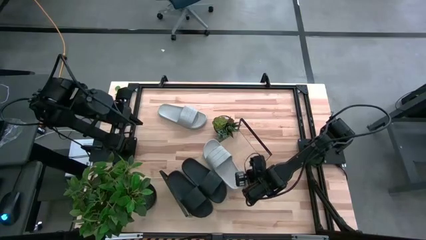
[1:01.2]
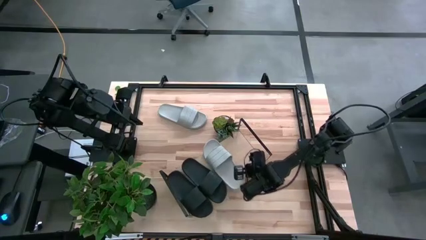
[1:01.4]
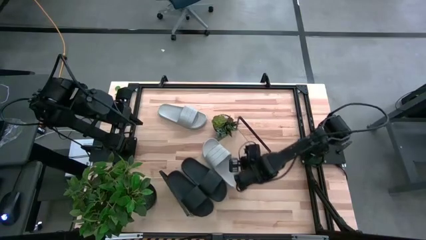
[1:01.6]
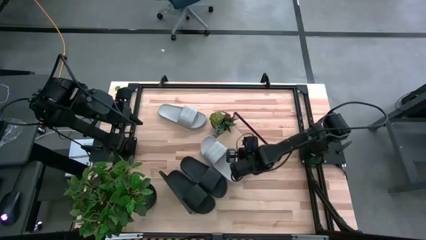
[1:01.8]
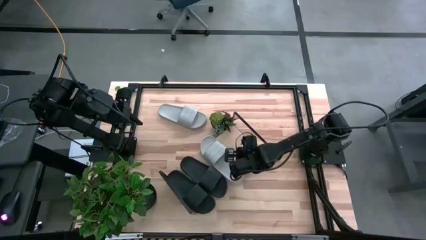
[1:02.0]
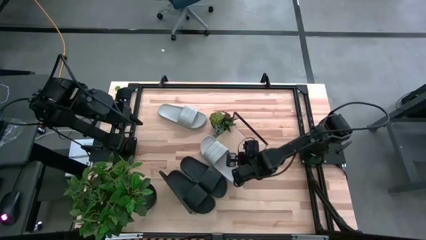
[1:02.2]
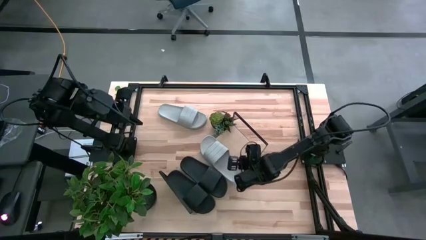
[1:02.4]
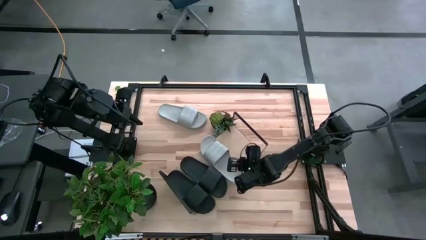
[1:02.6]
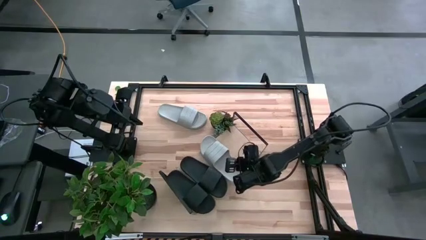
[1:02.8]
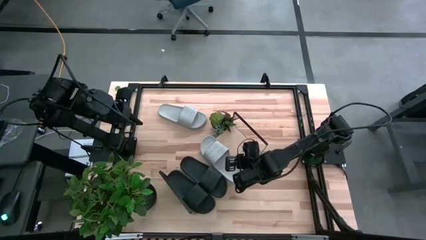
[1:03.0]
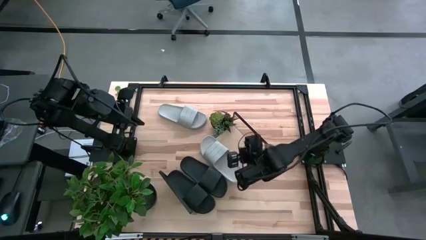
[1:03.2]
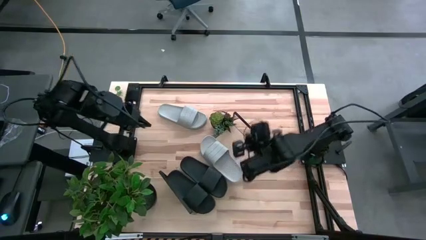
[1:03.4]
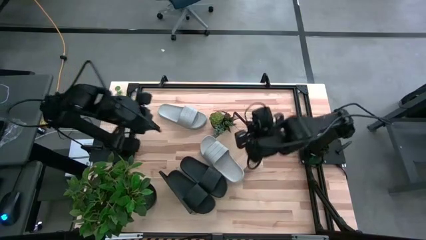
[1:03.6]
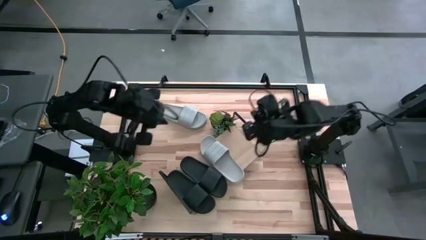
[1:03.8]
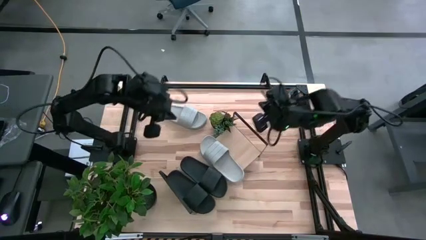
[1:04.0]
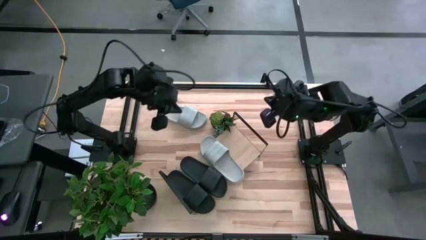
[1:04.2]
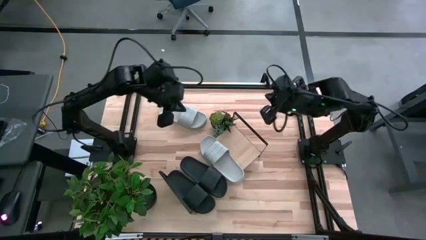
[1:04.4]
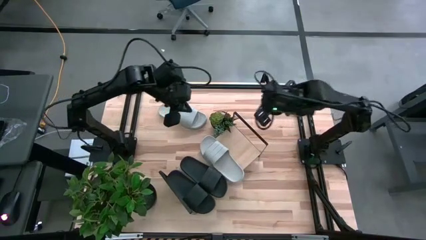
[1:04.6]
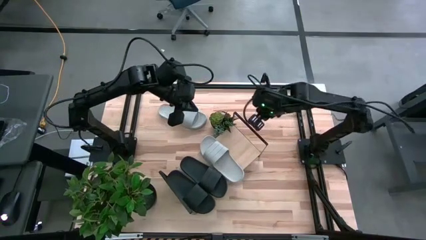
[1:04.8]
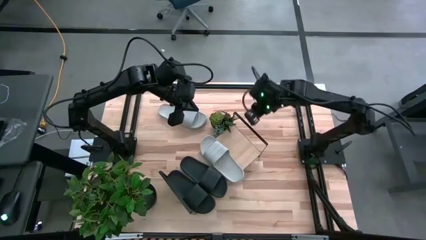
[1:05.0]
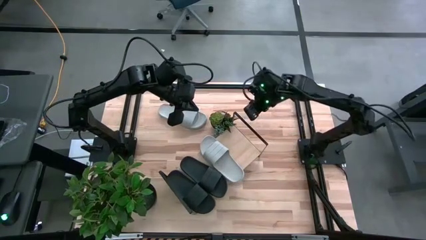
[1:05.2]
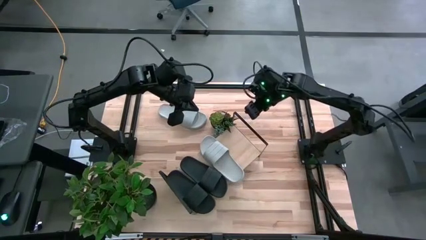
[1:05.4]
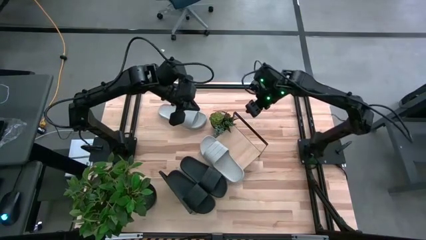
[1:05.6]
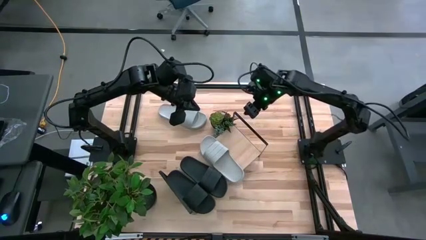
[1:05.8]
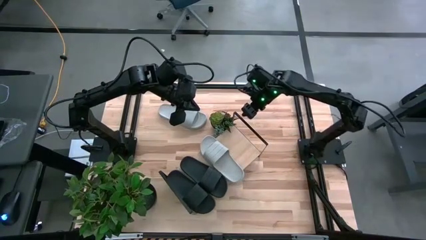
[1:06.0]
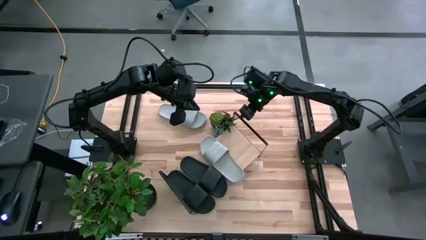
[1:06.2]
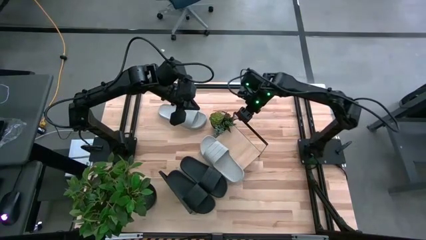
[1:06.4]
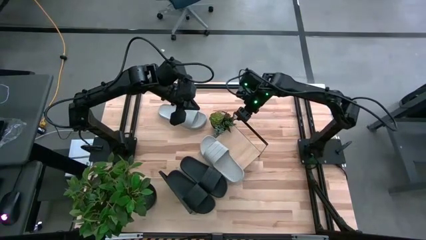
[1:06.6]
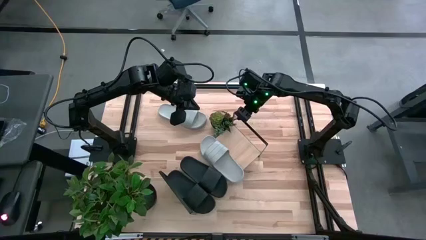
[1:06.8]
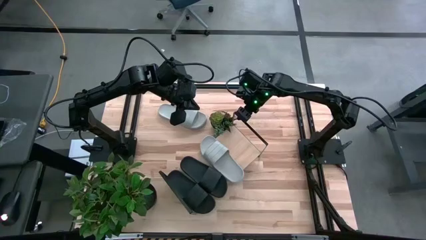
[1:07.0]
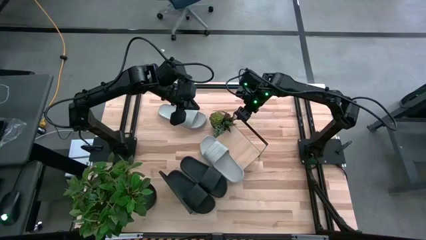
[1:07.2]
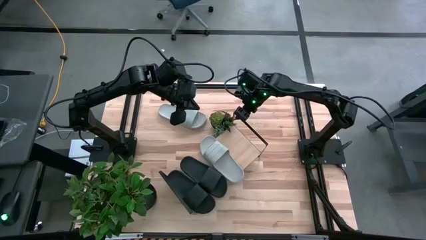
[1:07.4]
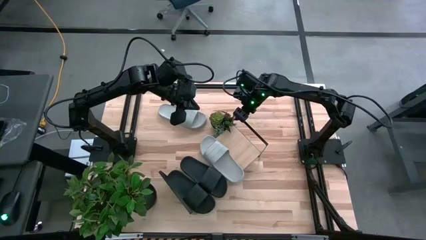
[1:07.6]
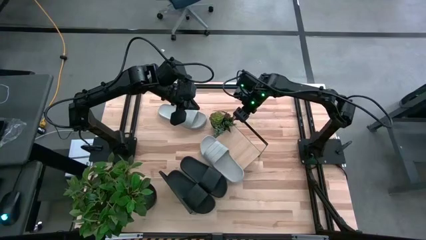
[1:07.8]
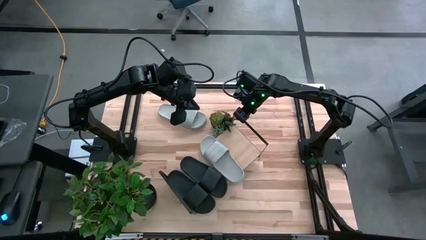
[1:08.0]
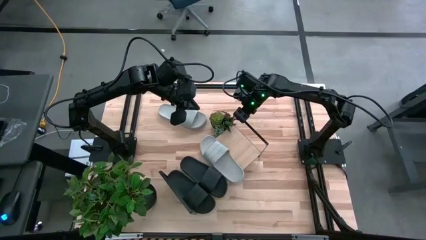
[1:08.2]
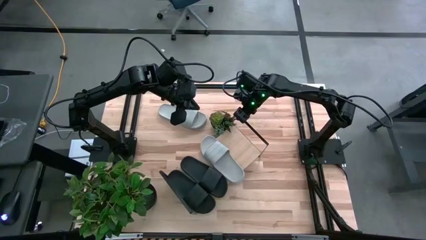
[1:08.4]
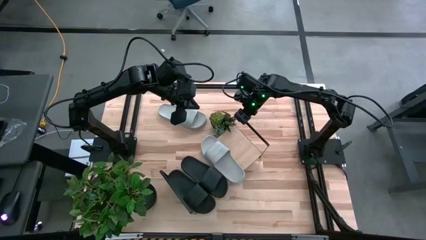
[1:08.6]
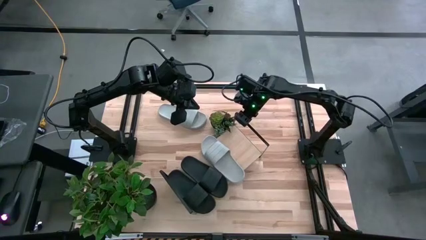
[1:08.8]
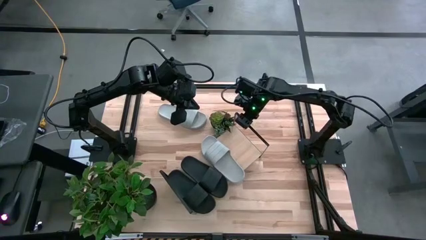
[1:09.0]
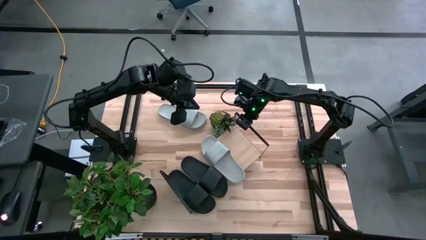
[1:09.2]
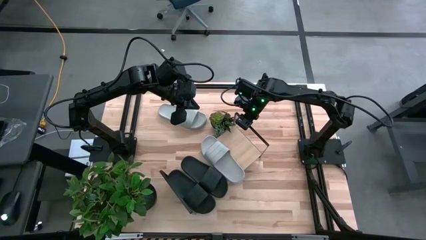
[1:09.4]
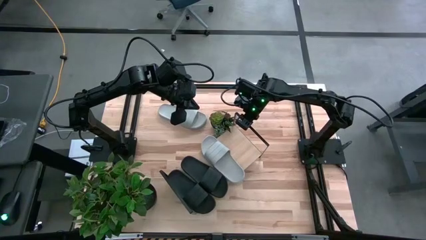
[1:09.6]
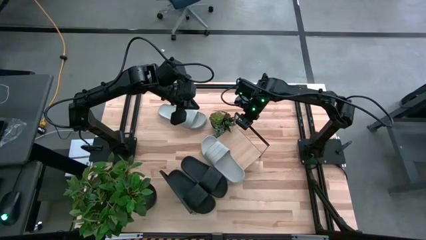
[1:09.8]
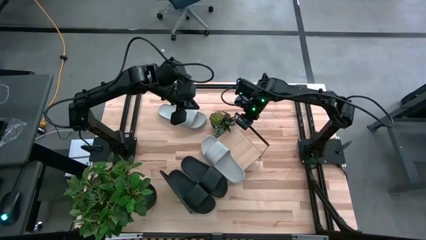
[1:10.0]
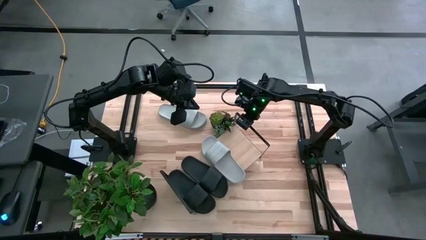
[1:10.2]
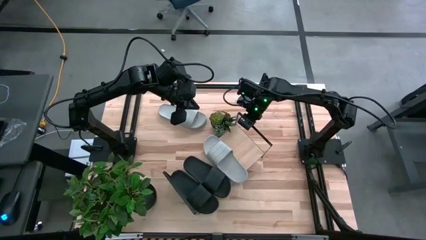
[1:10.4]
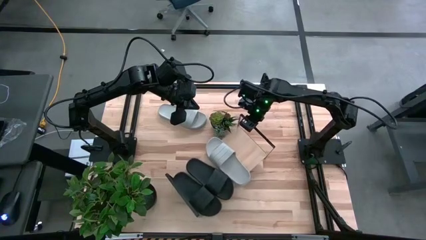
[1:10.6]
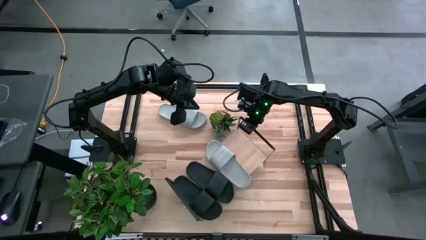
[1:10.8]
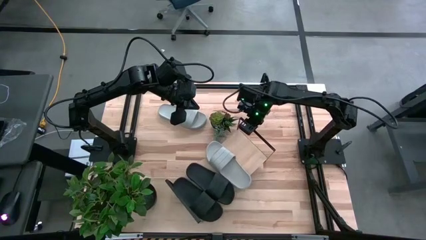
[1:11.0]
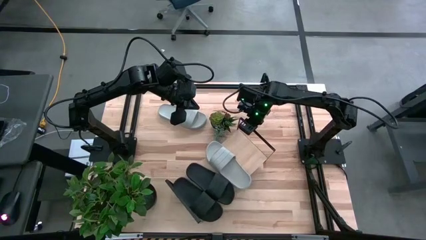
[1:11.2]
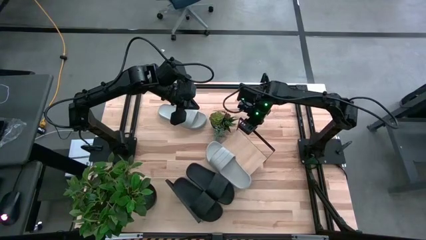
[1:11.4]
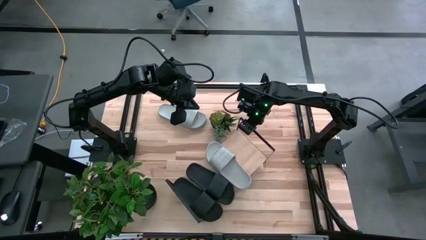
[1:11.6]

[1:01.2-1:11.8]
Task: Pick and place slides into the shelf
Adjust the shelf
